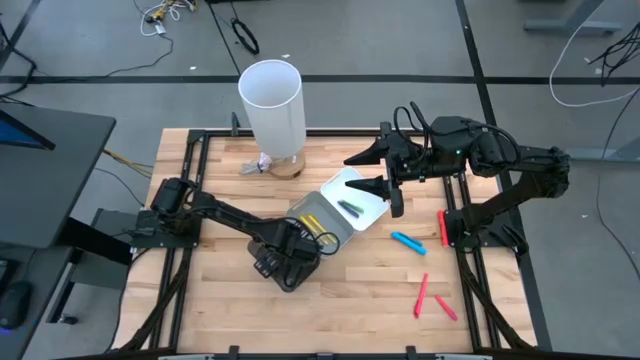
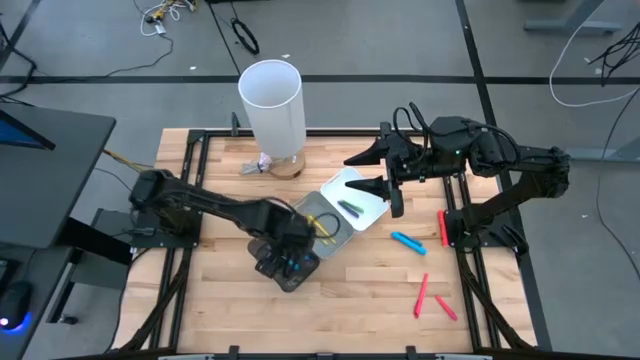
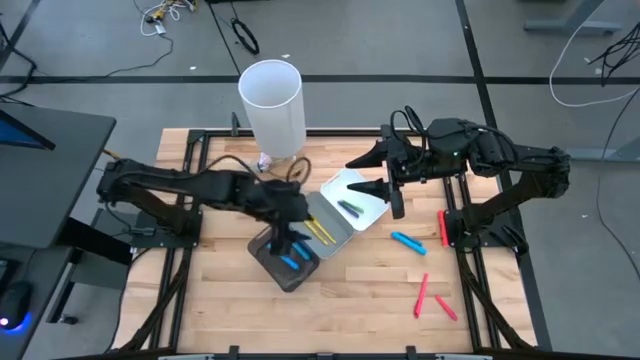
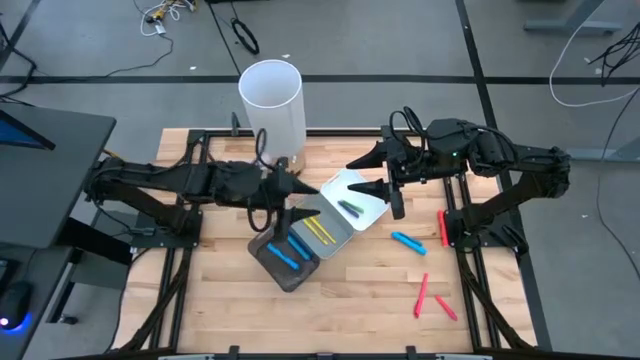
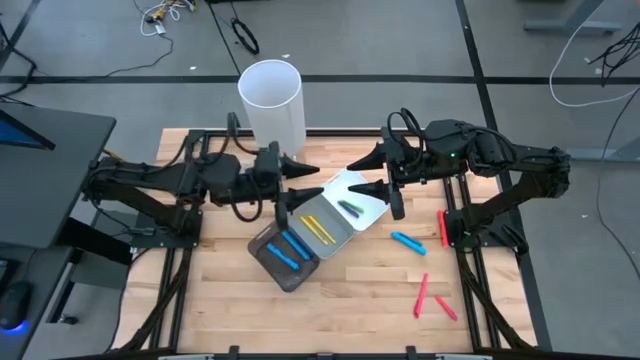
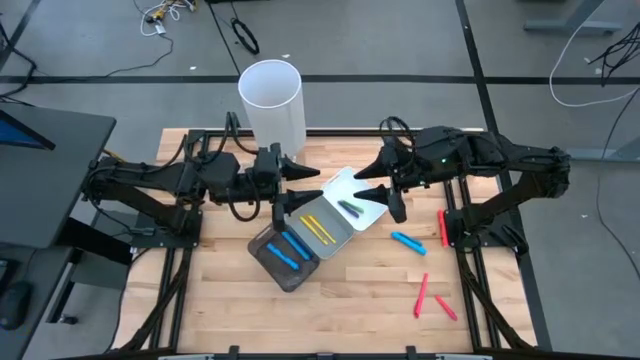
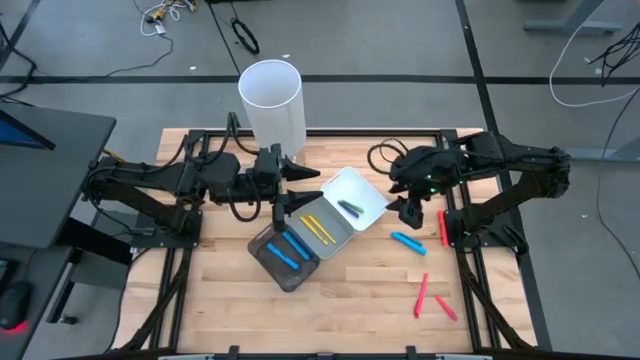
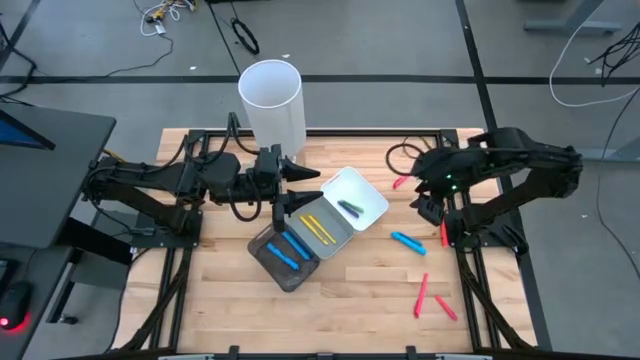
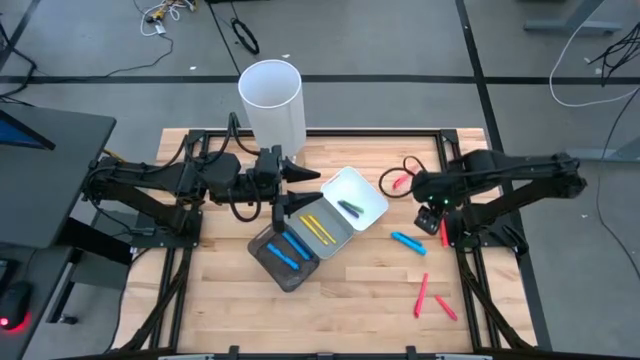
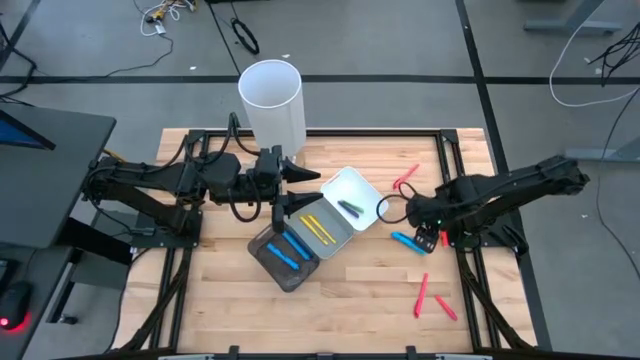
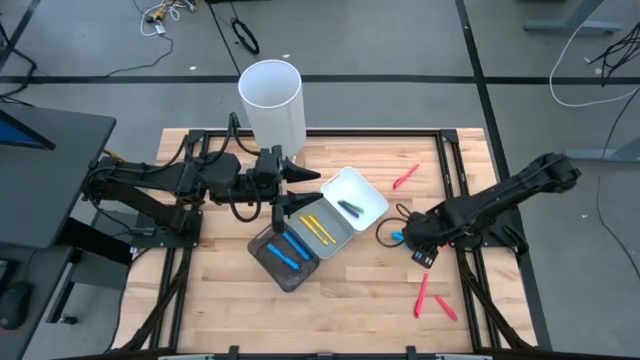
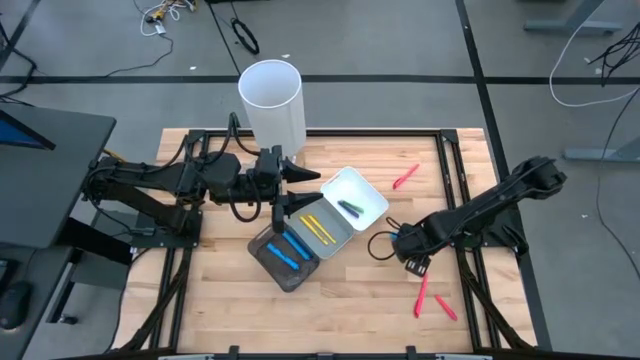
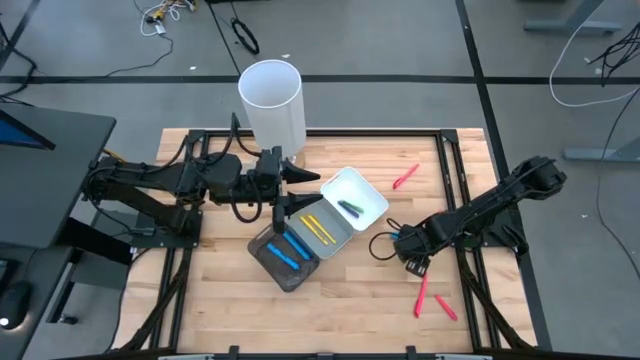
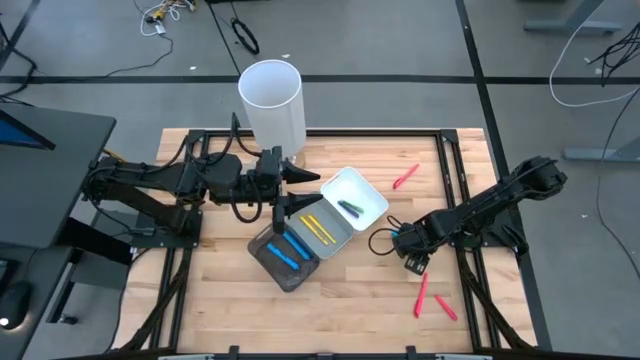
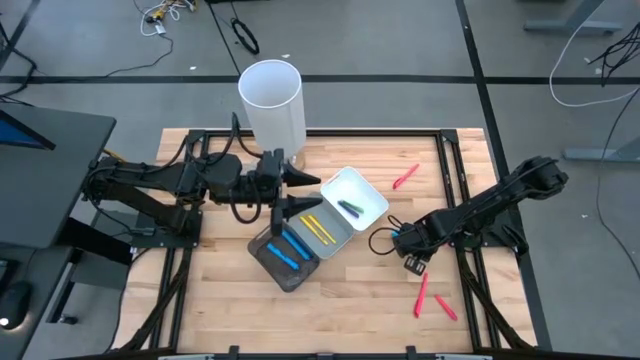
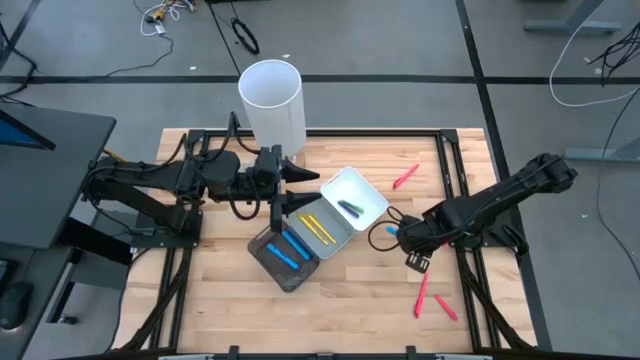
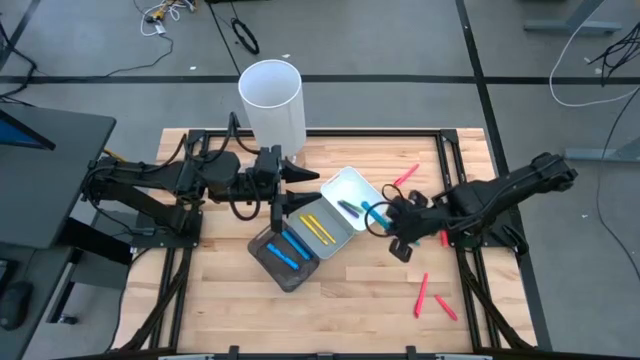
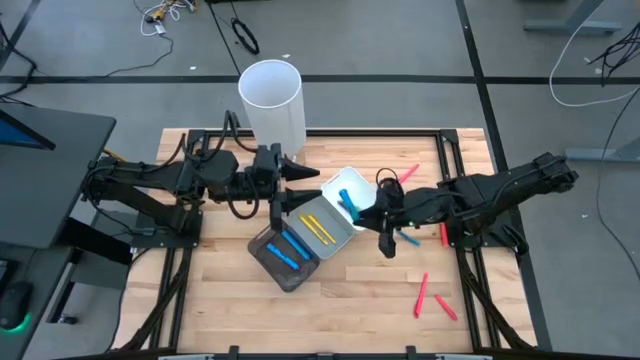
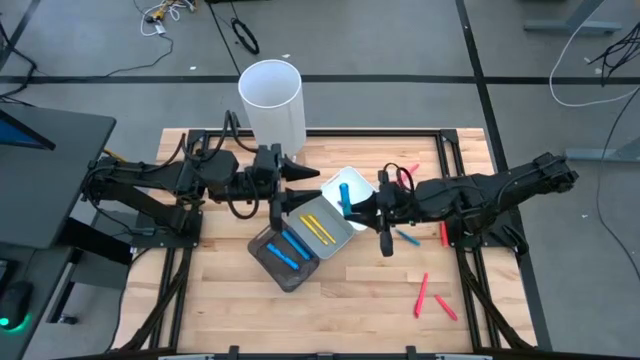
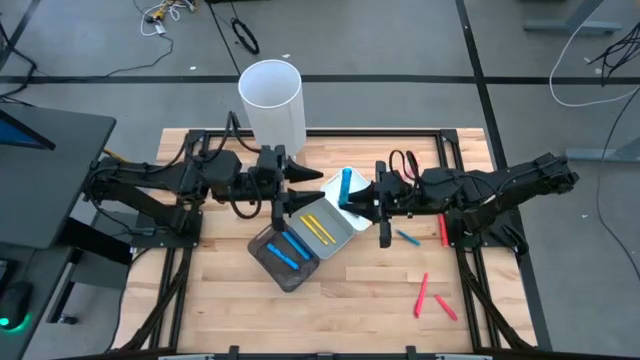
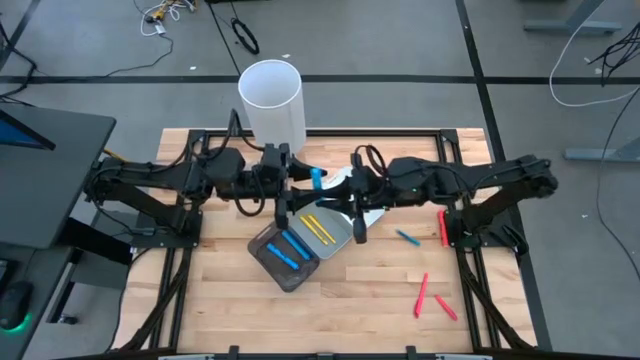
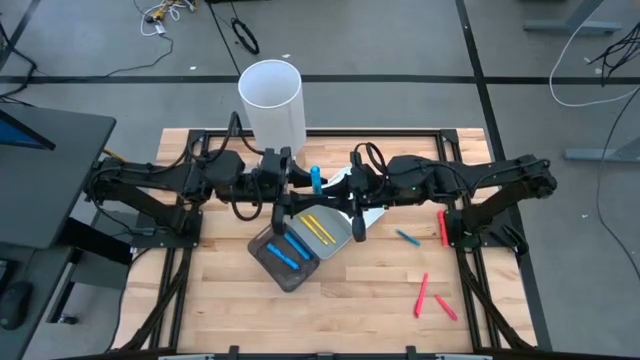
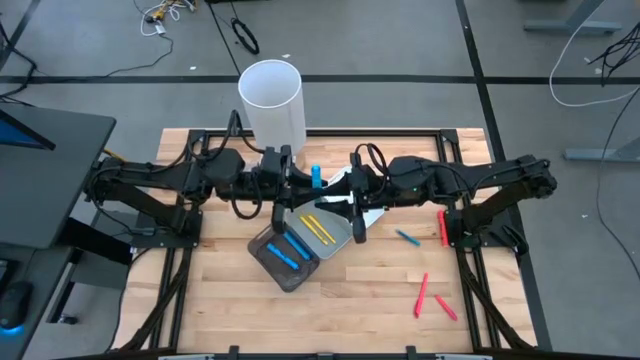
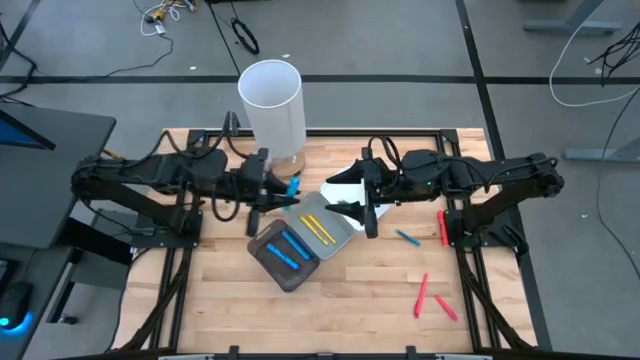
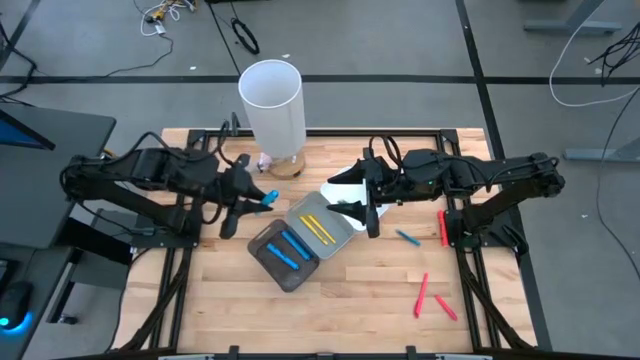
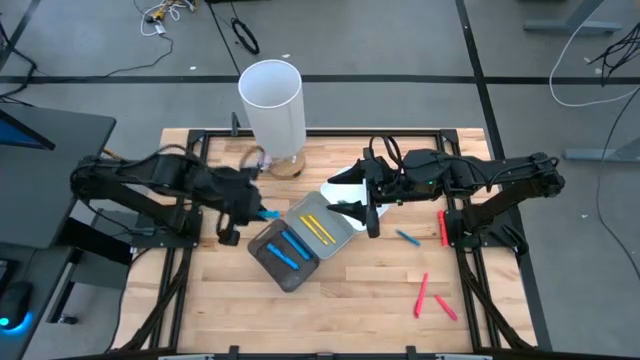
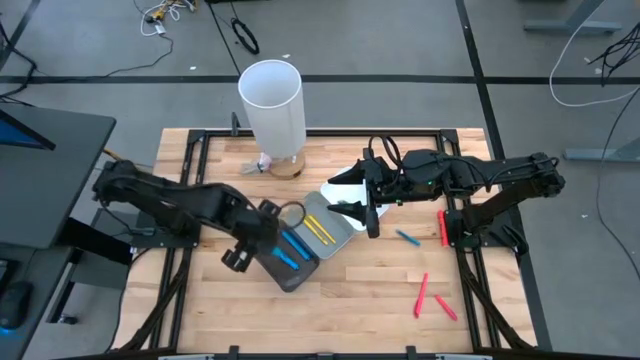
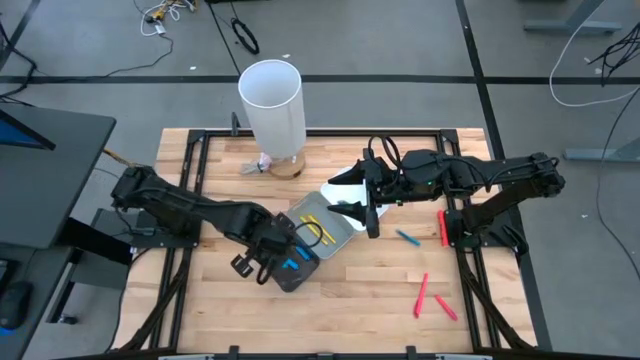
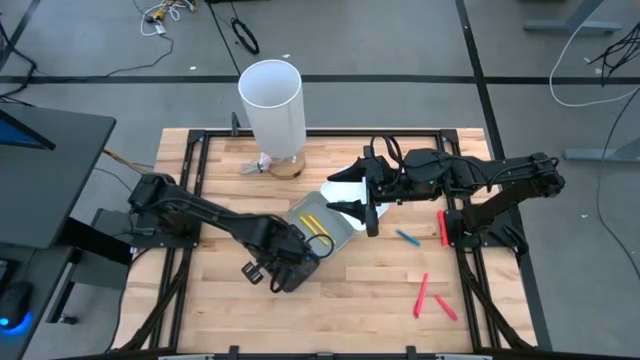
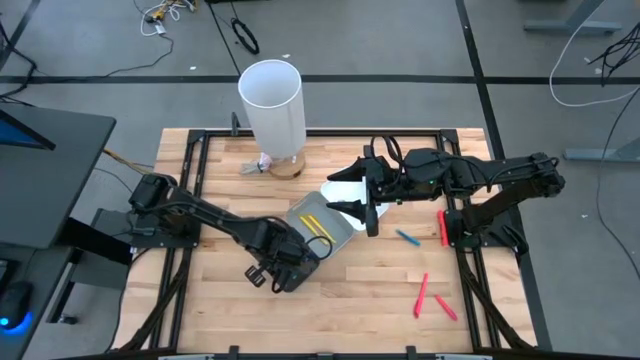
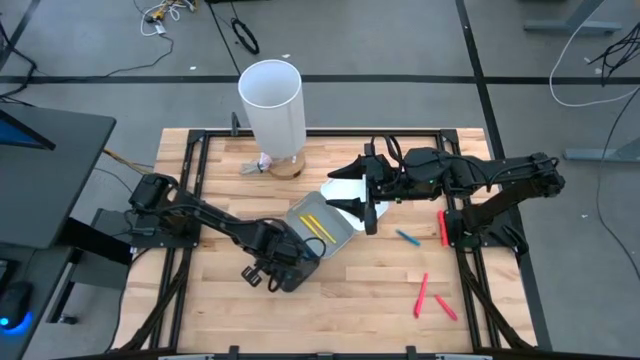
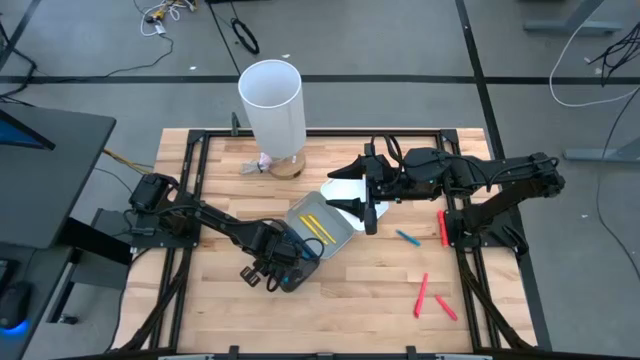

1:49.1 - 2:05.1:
Task: Pick & Place Markers
Put the blue highlighter into the black bin

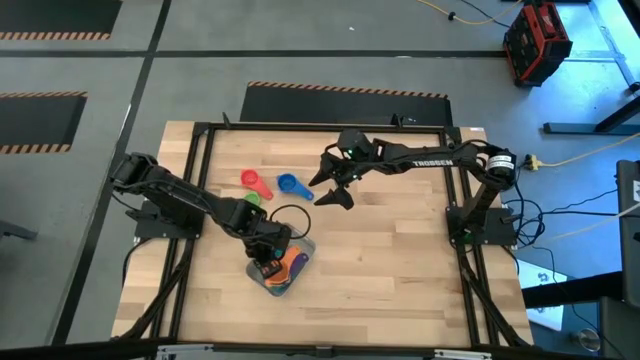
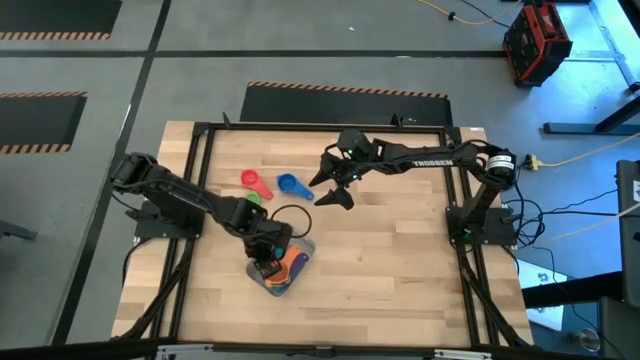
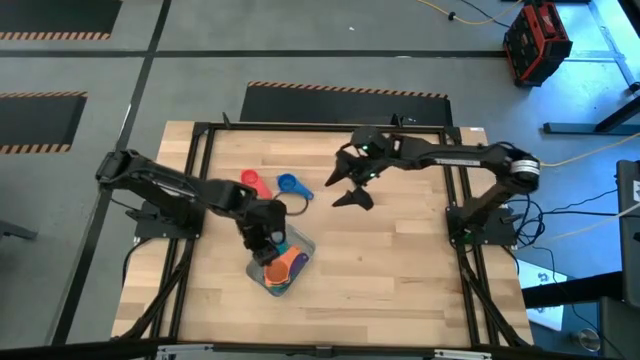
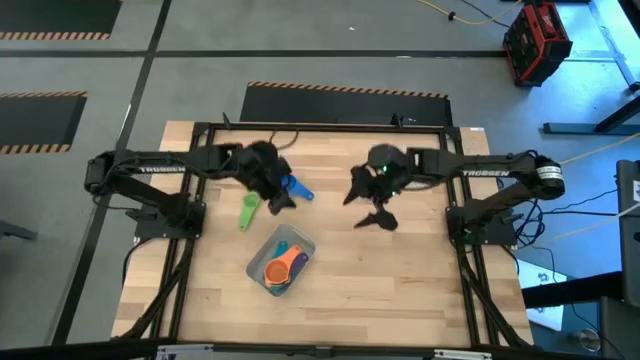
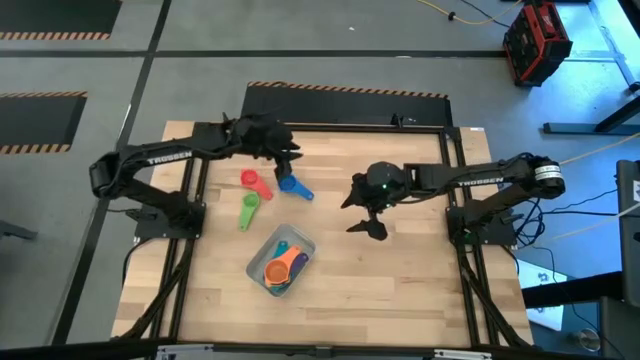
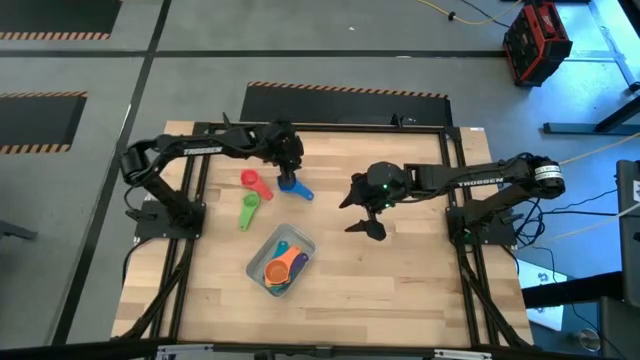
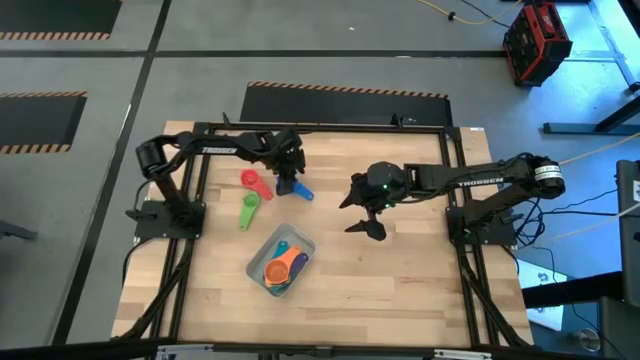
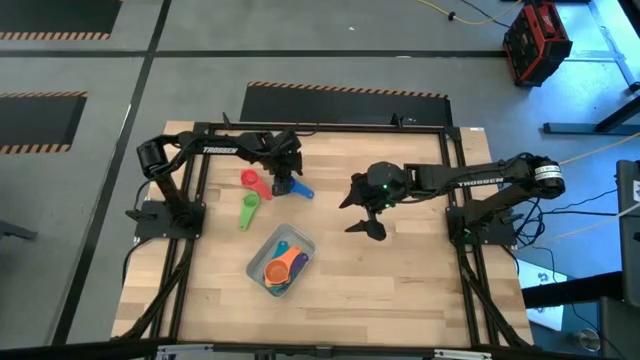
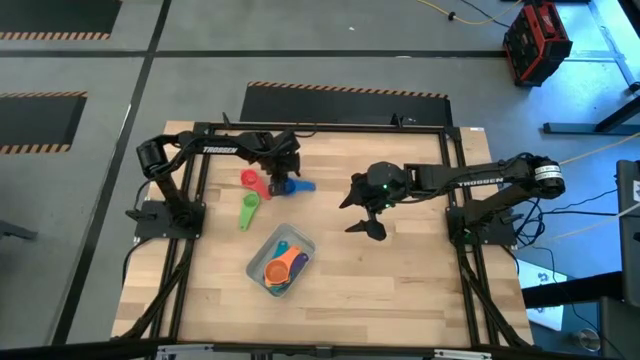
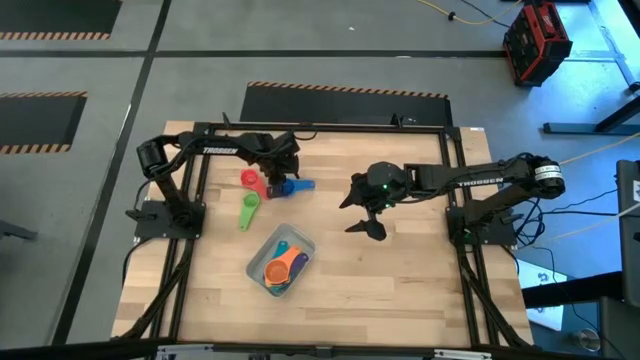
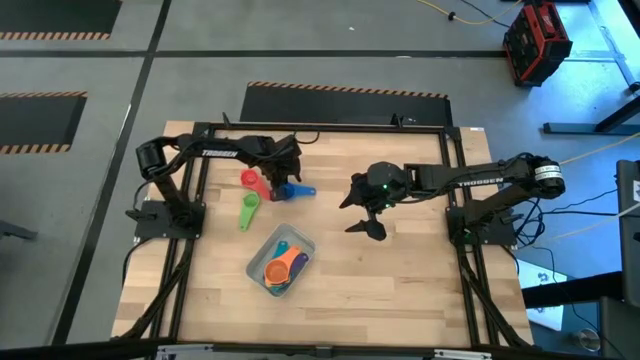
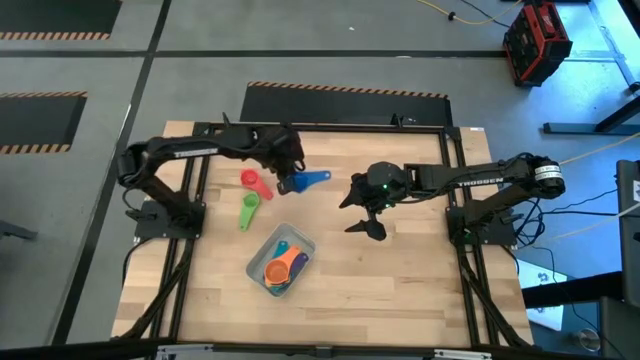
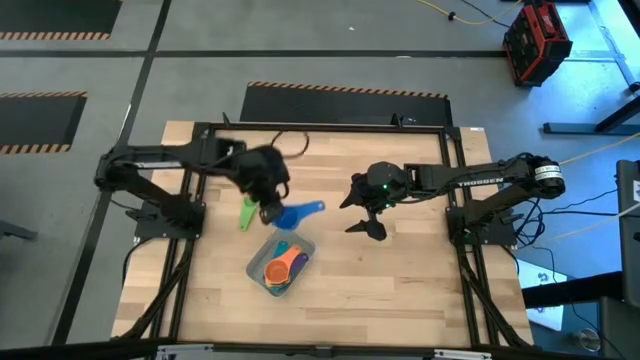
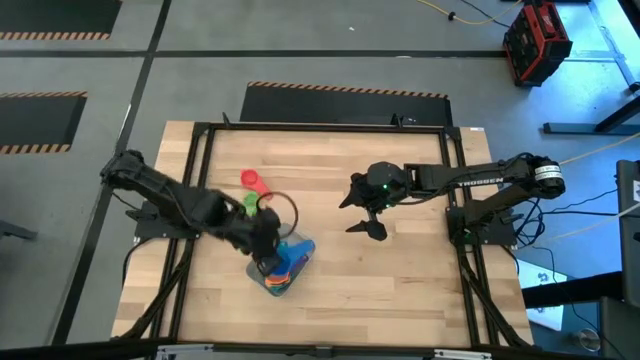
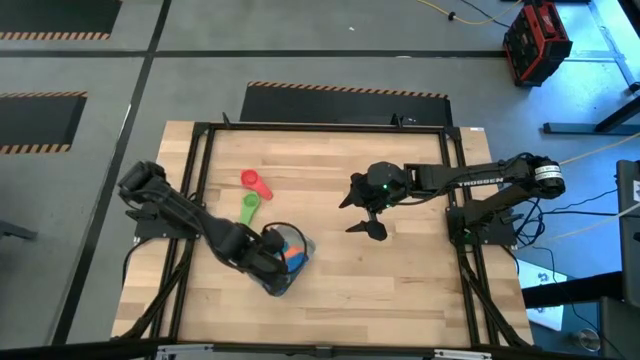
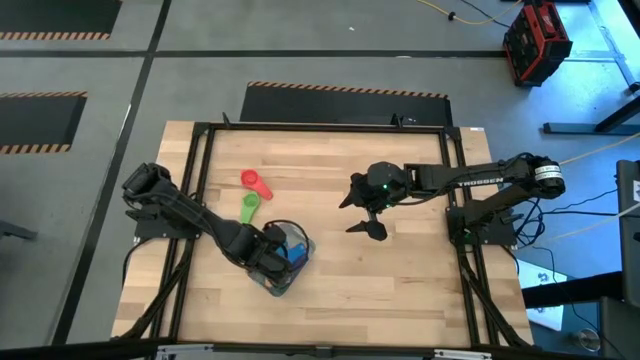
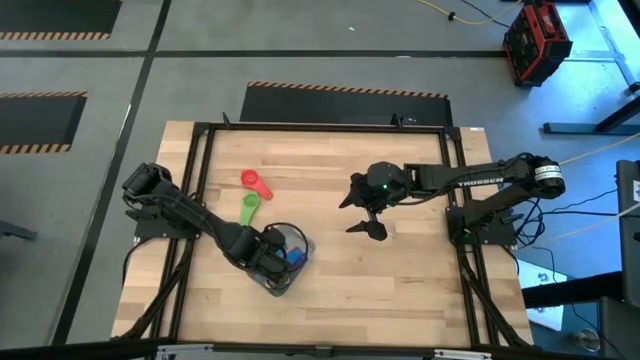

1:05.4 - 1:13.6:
Task: Nest measuring cups in basket
Stack the blue measuring cup into the orange measuring cup in the grey bin
